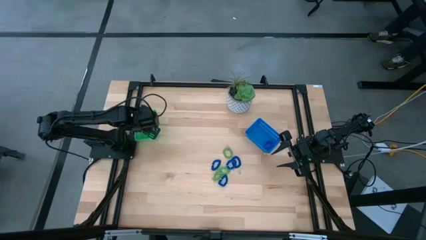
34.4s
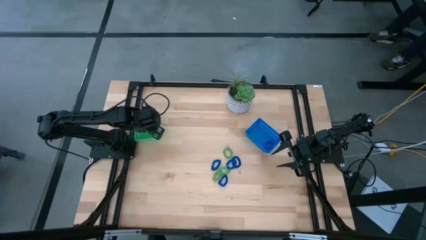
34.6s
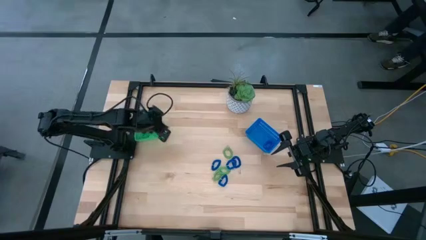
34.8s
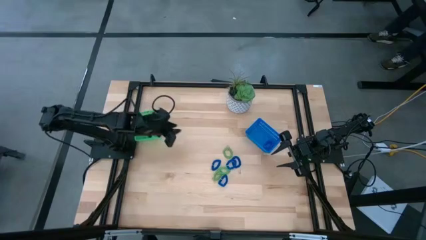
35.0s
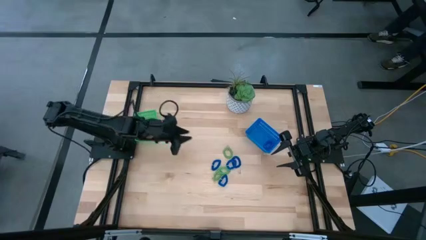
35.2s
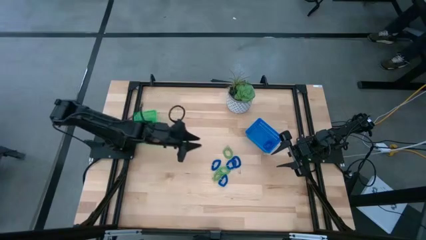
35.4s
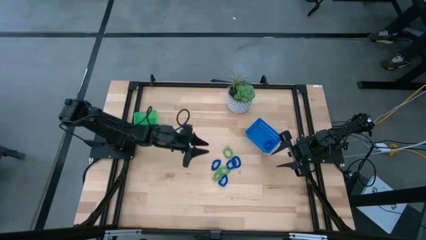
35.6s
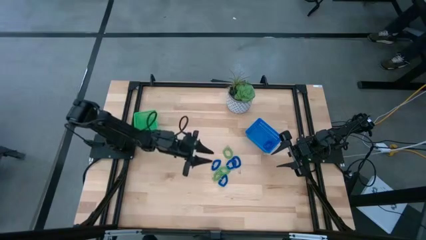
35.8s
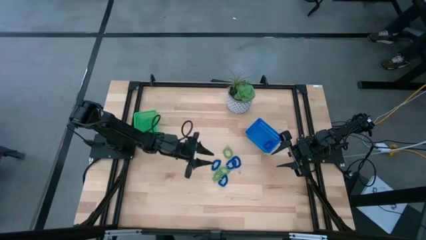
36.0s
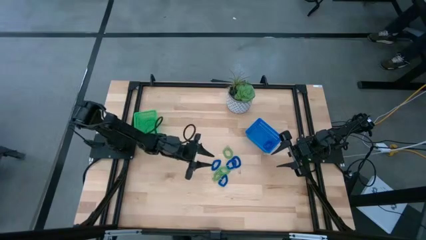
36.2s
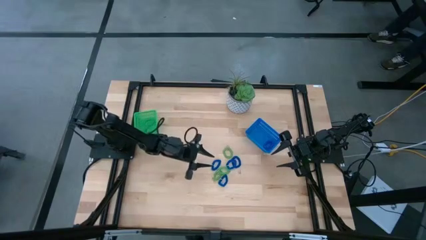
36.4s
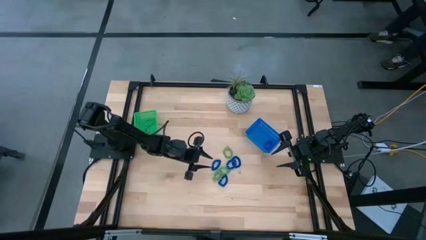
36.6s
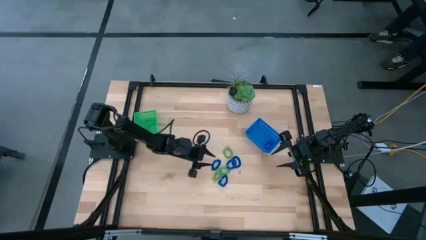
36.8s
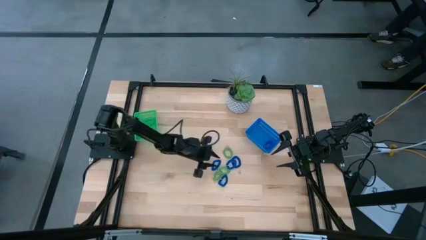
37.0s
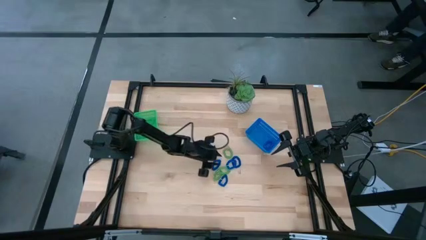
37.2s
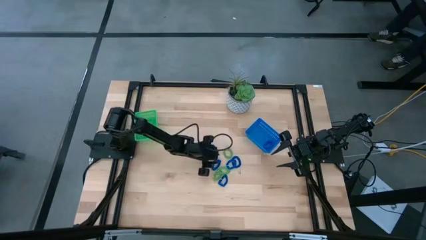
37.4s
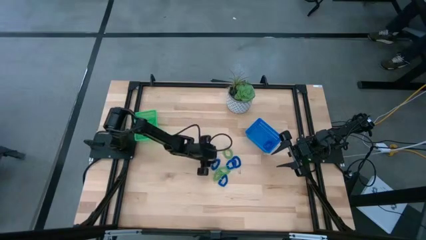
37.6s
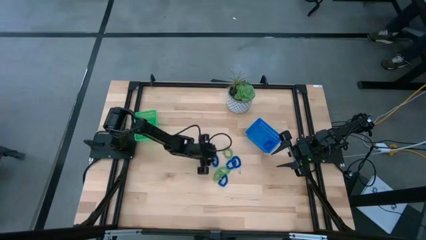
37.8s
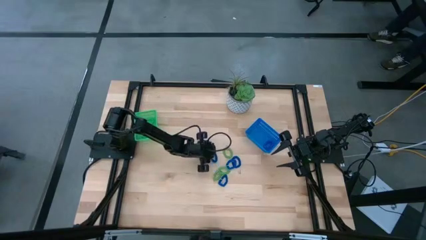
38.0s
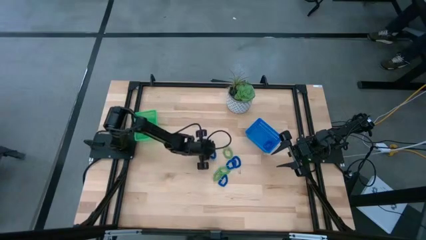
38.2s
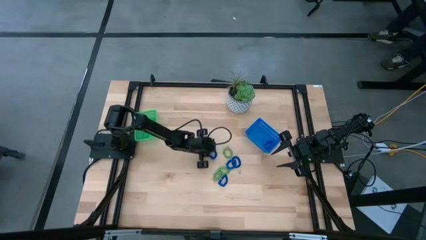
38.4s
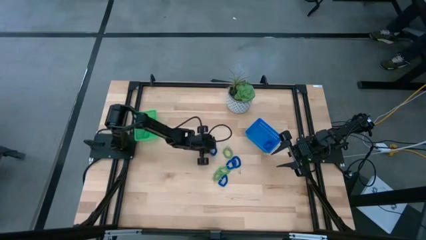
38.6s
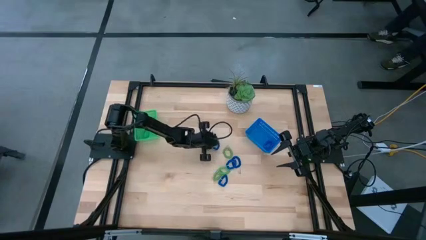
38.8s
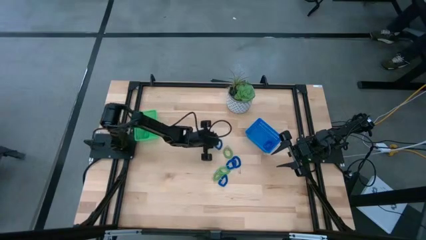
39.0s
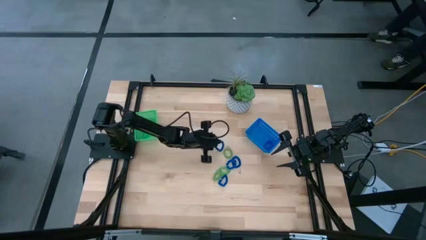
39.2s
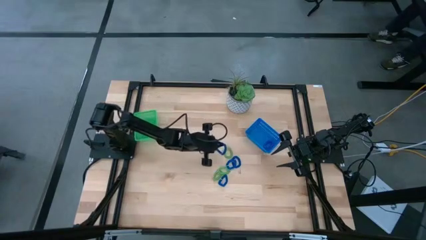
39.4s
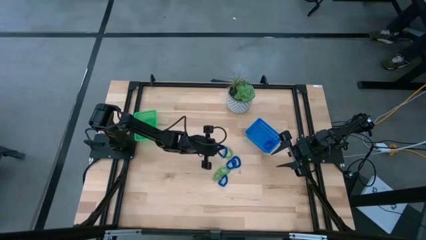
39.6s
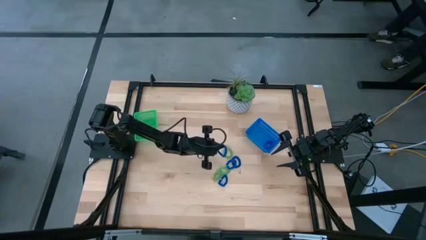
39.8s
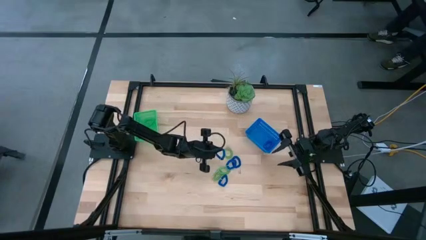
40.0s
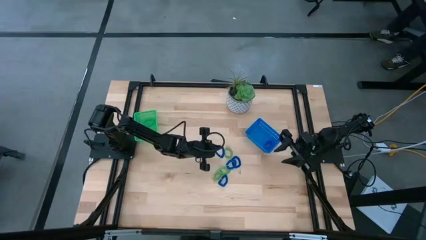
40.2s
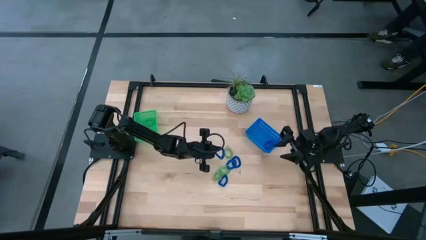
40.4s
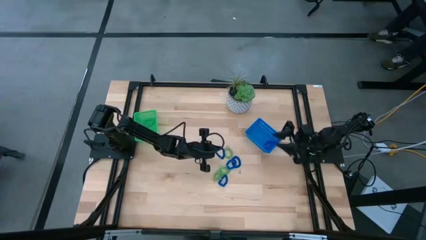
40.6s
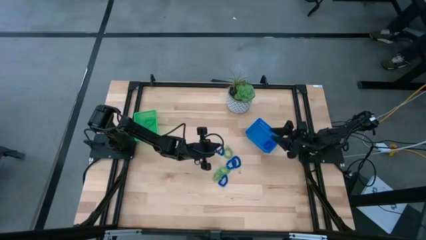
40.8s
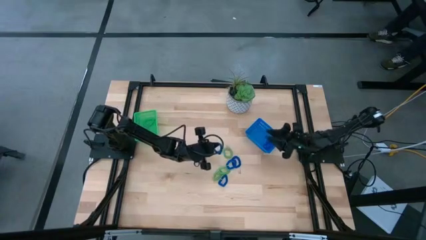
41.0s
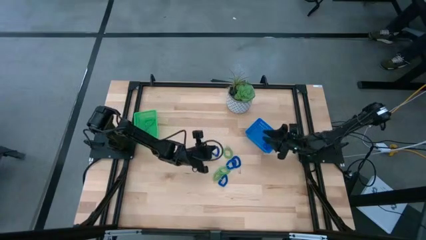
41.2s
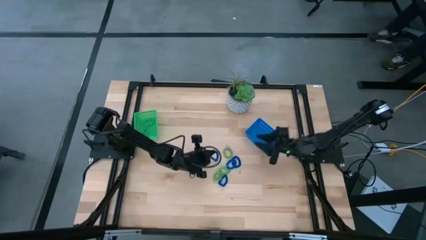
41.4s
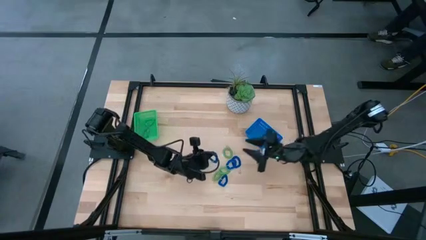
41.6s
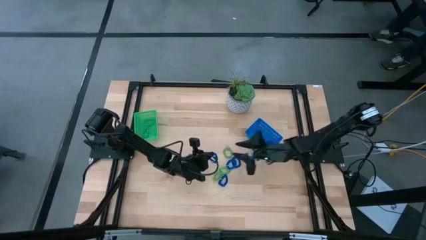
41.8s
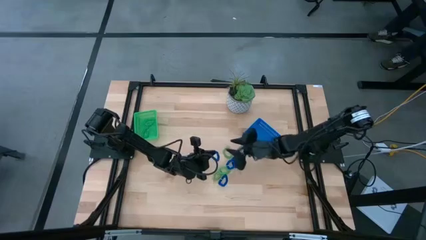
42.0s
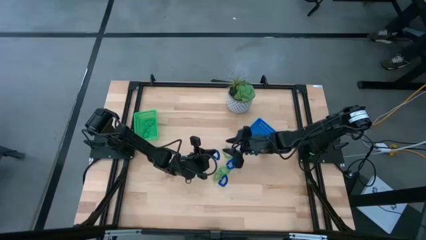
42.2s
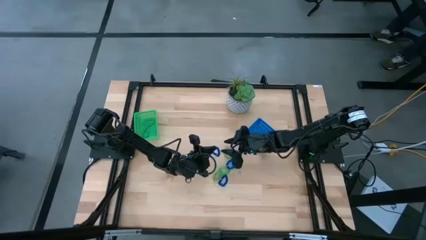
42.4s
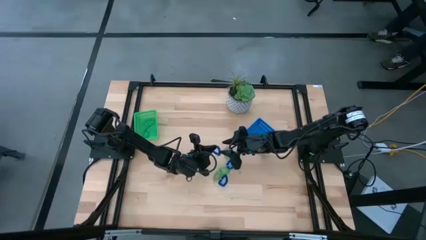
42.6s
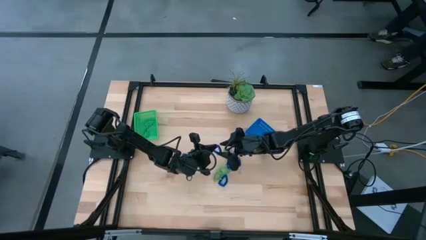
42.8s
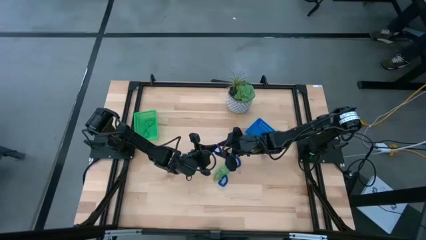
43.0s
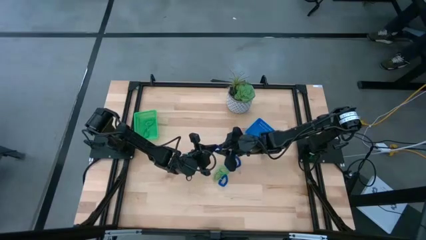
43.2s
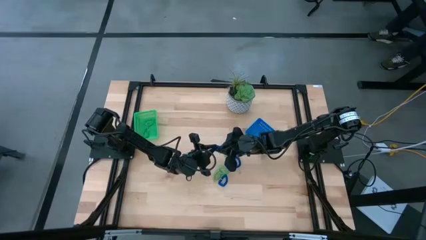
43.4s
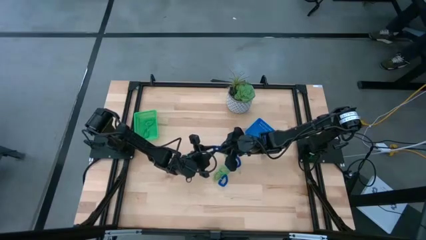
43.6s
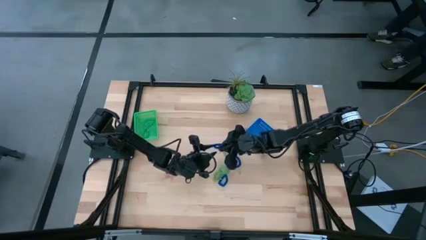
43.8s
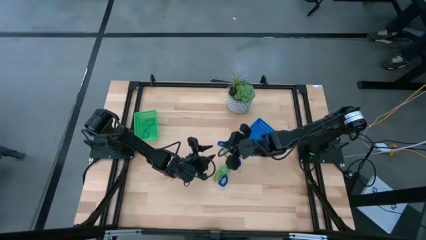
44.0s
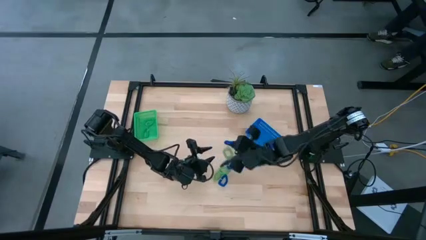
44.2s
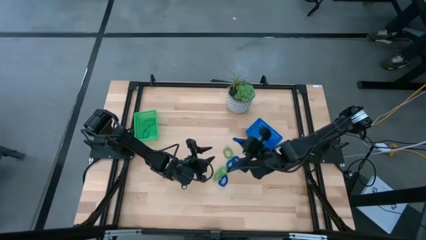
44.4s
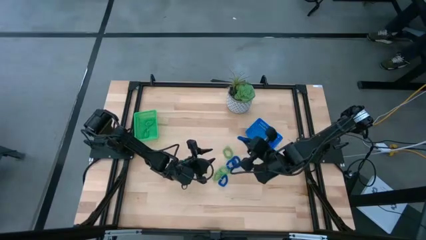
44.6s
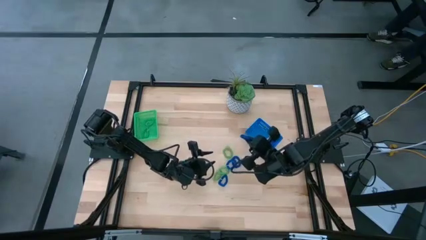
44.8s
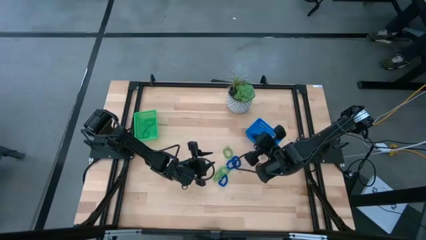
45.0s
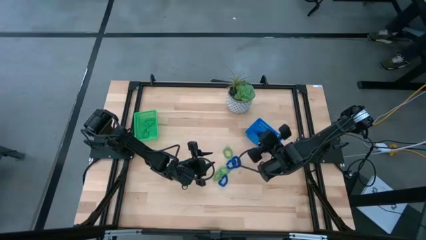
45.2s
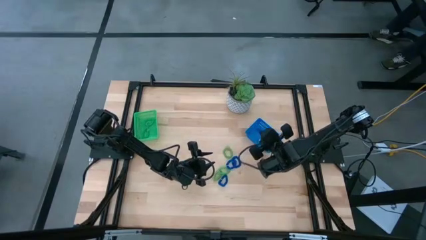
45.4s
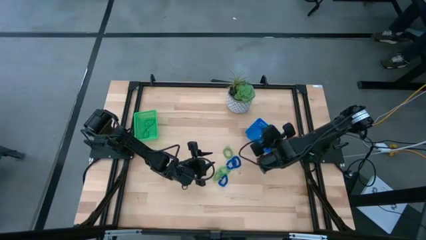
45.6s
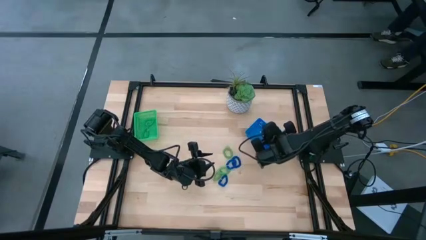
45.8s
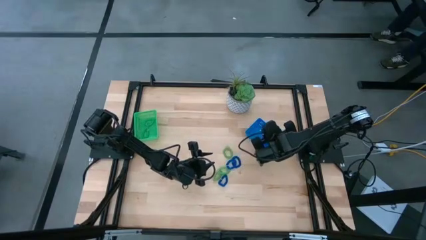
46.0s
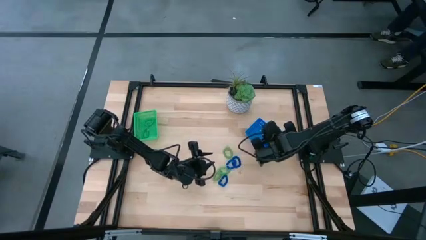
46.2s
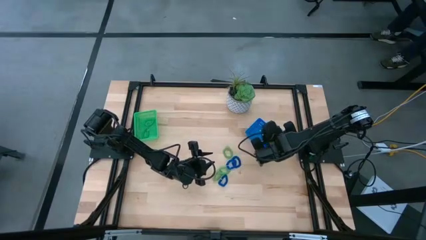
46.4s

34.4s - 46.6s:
Task: Sort spring keychains
Put the blue spring keychain in the blue bin
